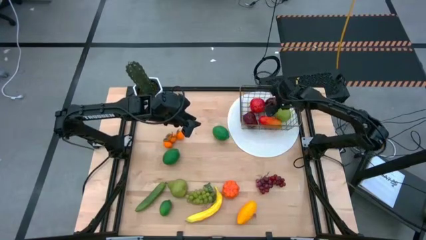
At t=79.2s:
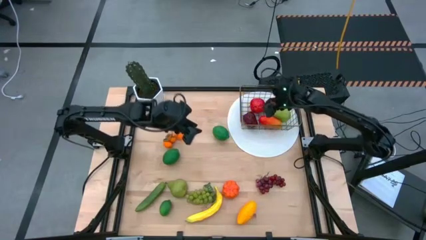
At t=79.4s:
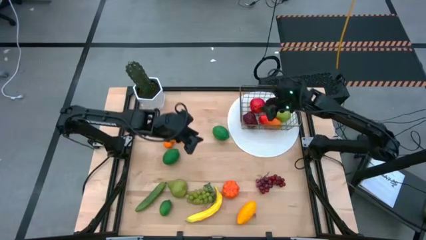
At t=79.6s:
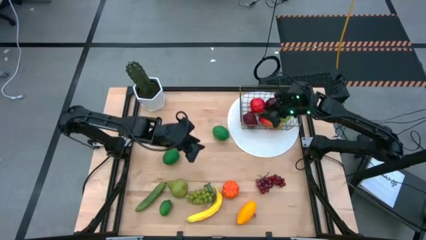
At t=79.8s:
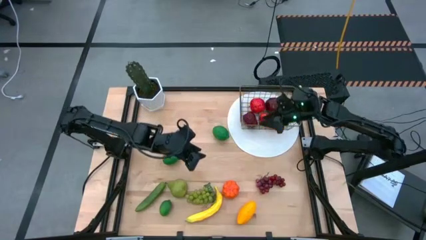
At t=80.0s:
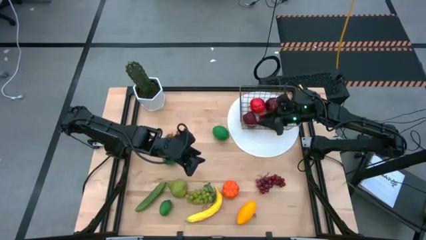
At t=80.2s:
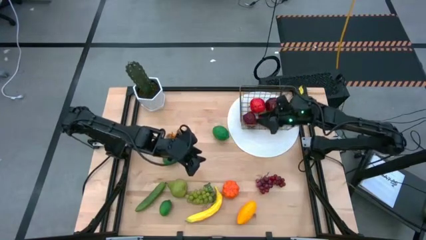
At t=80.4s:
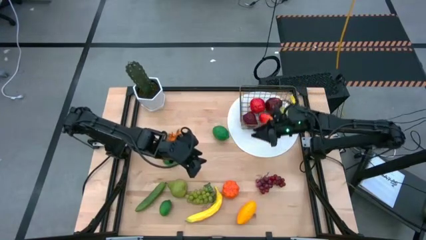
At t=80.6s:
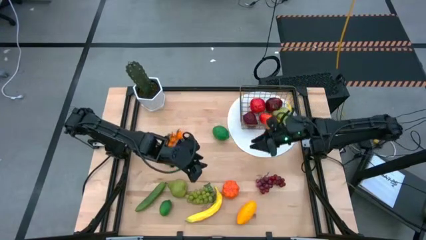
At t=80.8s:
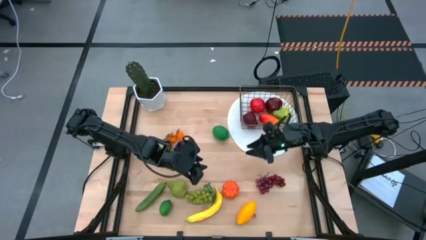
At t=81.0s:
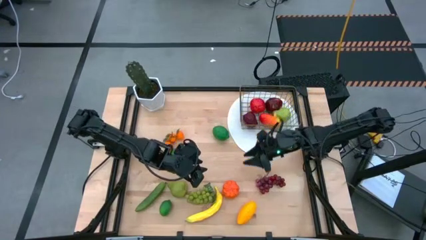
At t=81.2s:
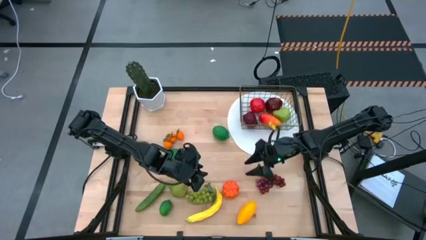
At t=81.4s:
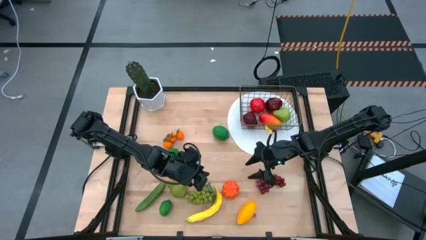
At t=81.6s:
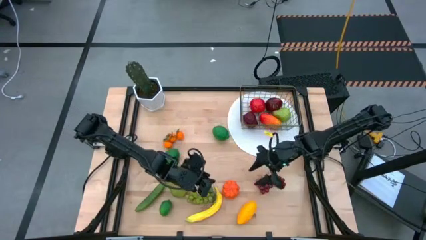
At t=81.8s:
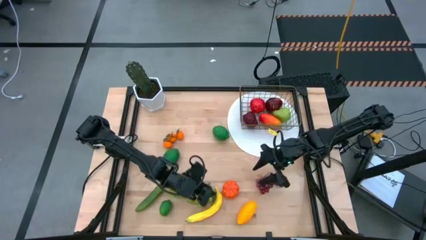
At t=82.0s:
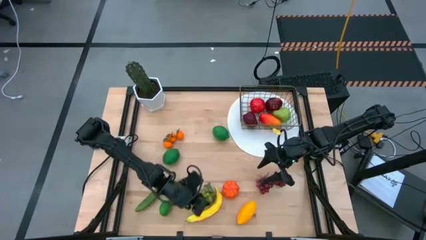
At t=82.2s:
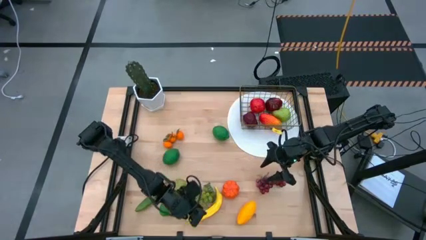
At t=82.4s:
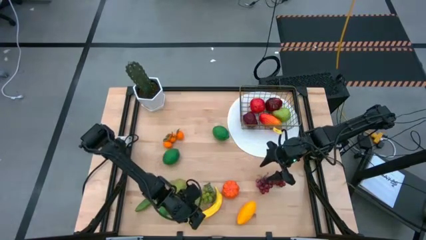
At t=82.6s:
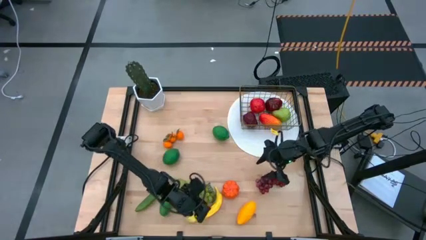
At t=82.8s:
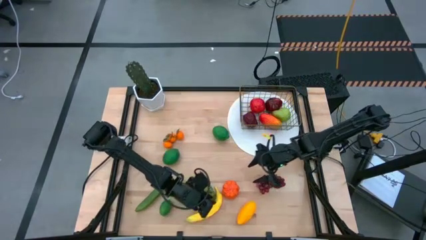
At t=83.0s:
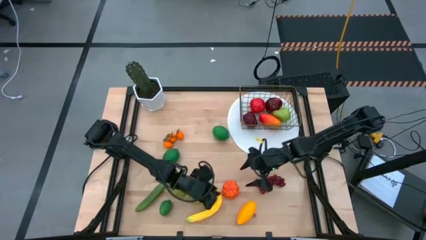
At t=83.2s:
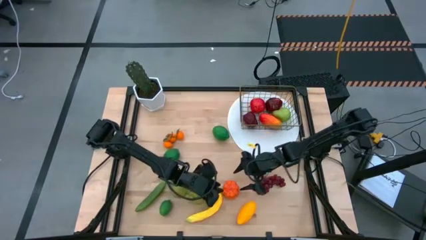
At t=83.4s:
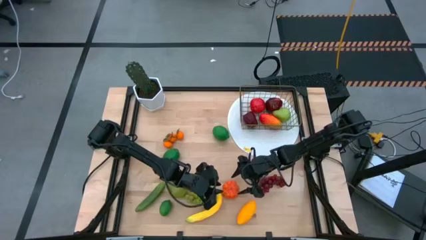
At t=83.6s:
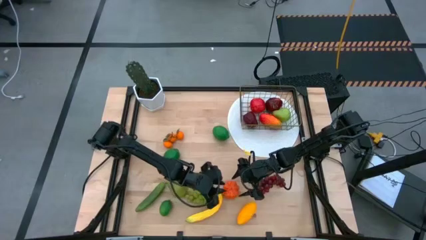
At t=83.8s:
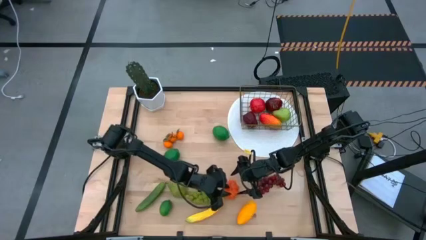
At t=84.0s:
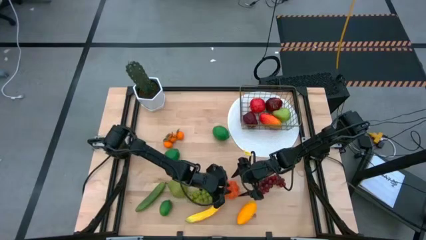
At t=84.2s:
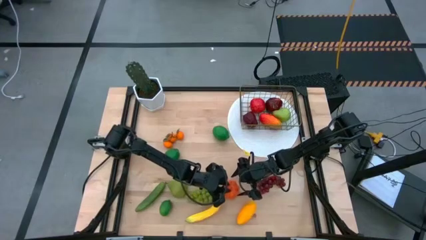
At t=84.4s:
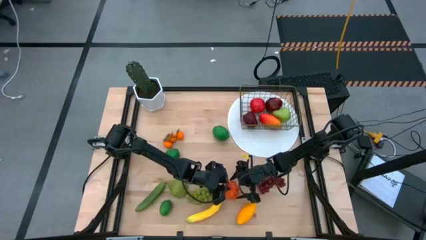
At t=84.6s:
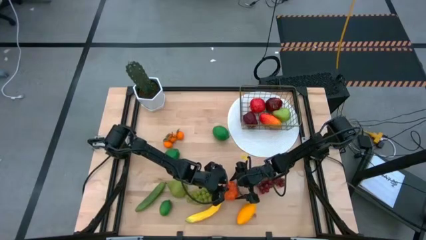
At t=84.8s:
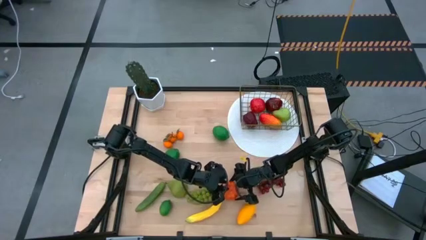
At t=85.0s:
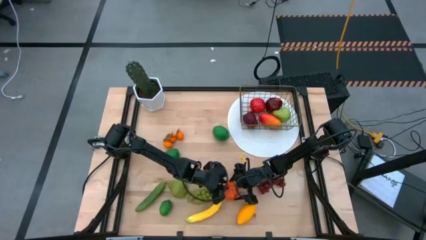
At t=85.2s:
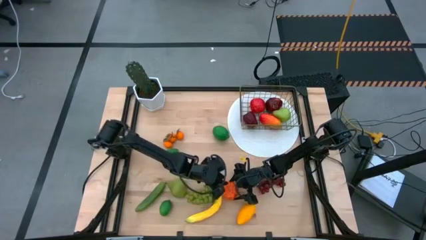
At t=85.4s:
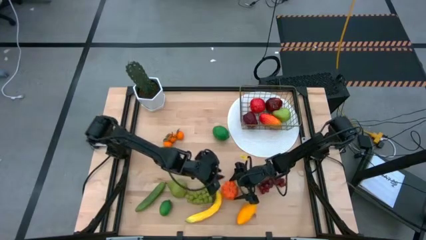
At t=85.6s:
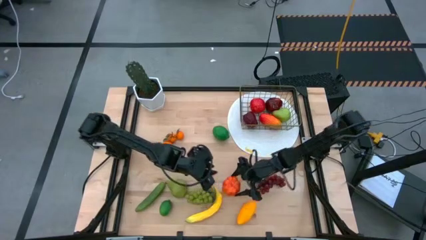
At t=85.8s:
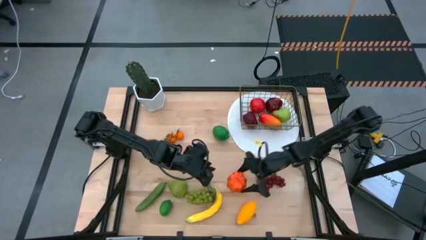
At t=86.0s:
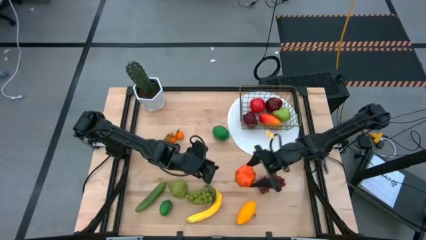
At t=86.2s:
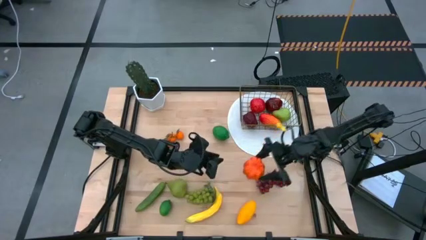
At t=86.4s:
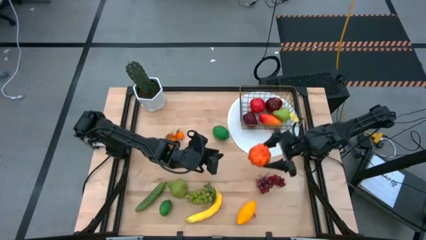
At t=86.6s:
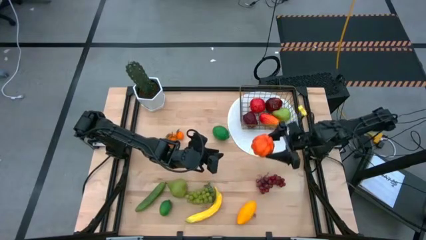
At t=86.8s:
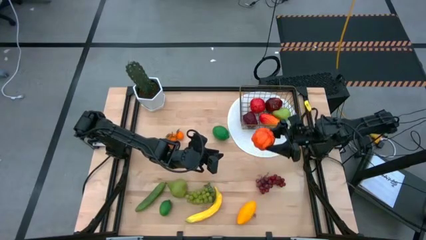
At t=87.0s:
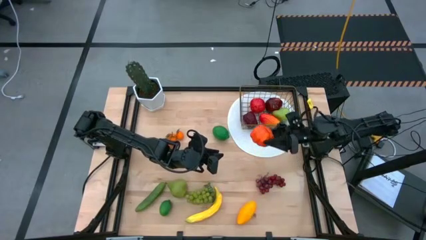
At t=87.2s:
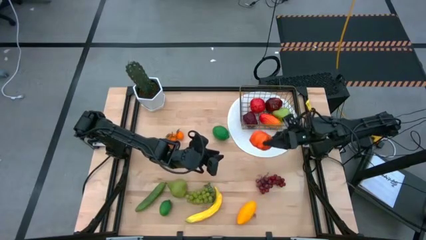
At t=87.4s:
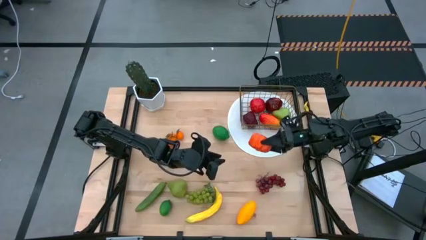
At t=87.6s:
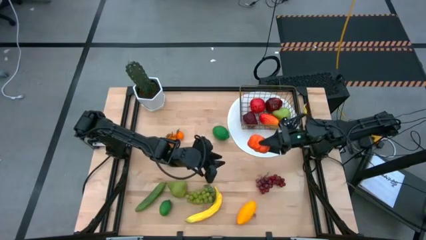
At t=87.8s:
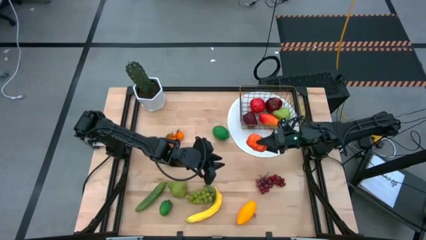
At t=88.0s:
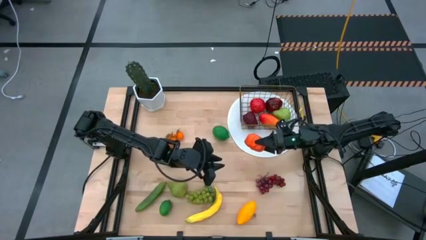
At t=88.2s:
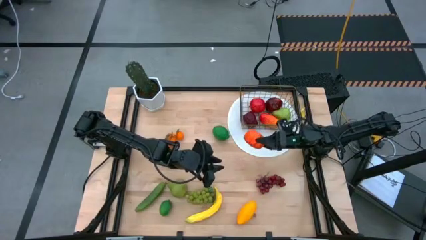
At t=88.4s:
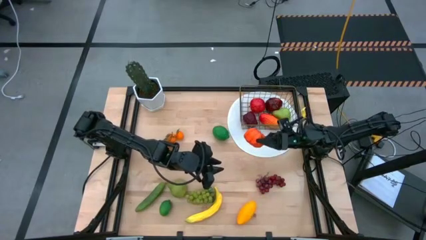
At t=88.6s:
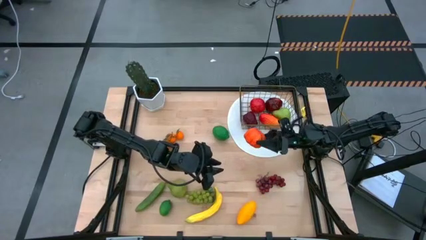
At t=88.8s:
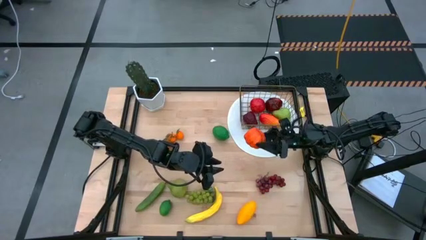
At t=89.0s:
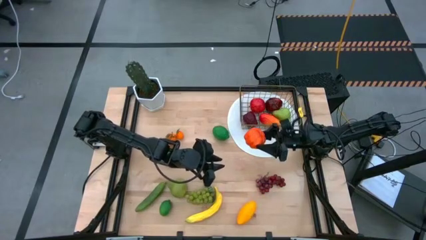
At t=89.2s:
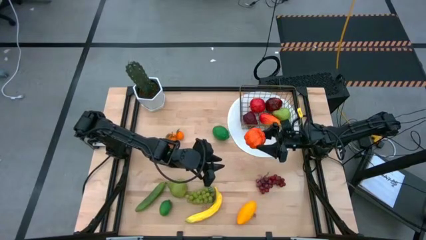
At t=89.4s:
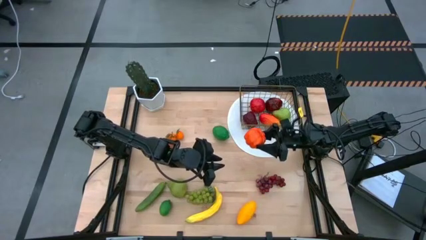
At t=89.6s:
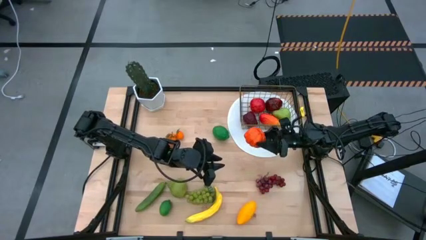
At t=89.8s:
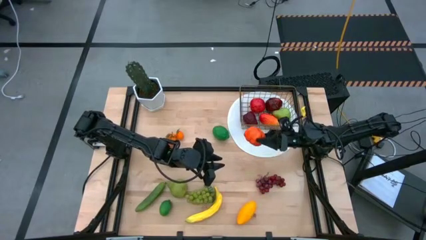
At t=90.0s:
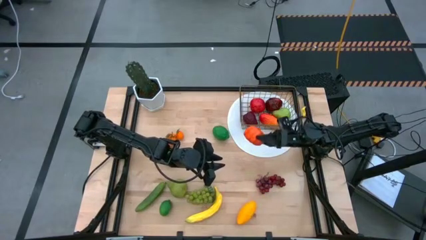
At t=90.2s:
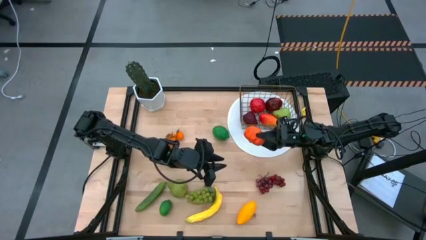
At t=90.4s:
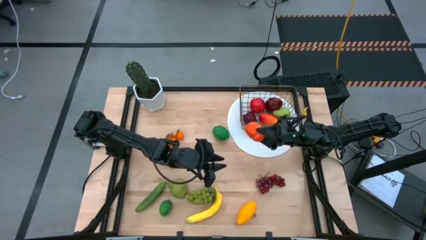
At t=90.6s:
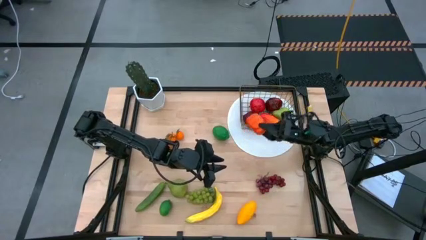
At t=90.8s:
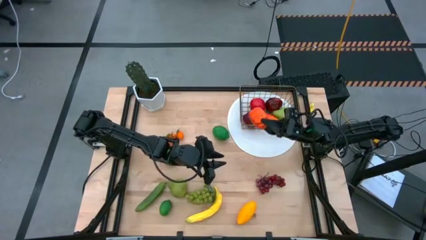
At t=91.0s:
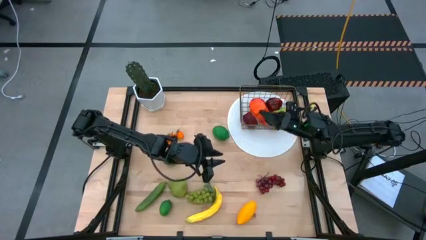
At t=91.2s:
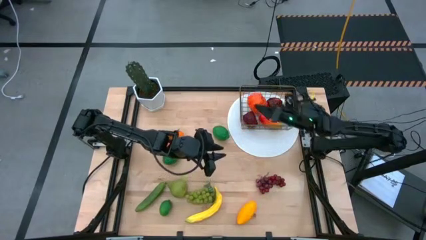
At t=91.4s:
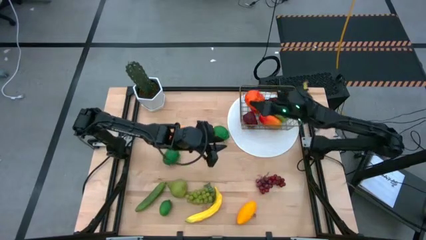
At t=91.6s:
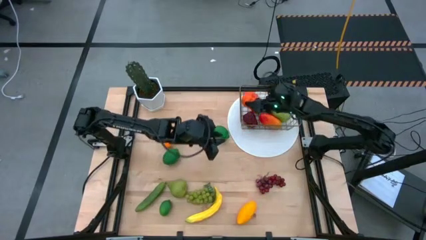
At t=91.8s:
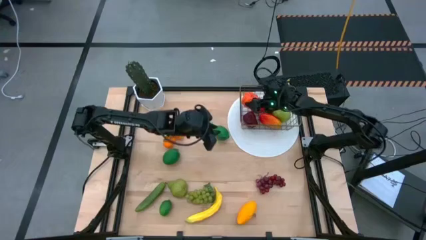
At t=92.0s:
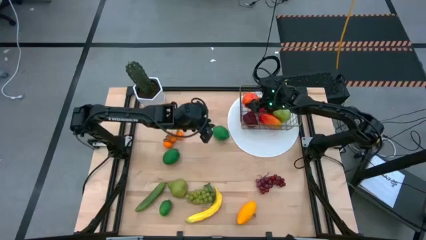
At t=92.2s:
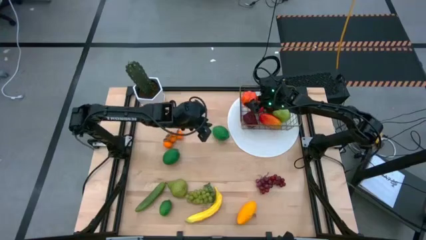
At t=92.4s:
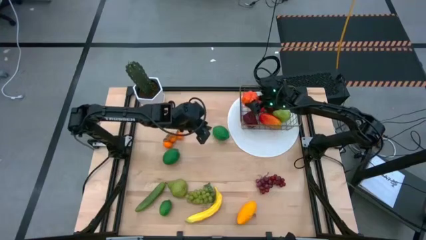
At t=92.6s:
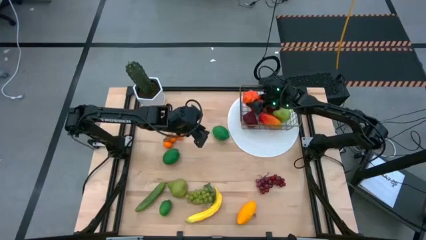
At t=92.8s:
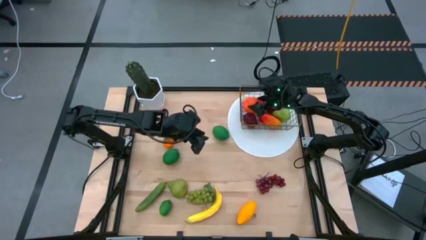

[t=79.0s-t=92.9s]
Task: Build produce basket
Put the orange pumpkin into the gold wire basket
